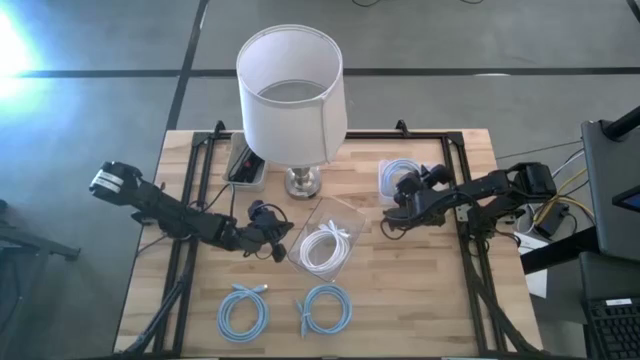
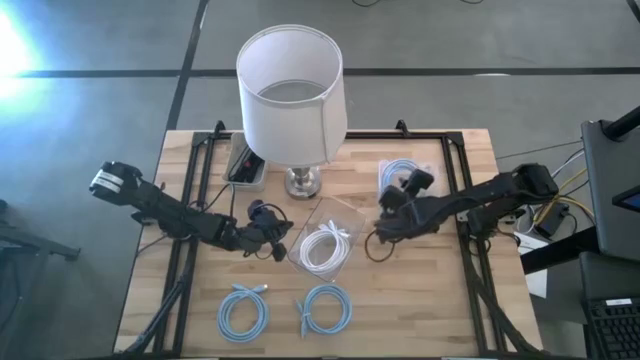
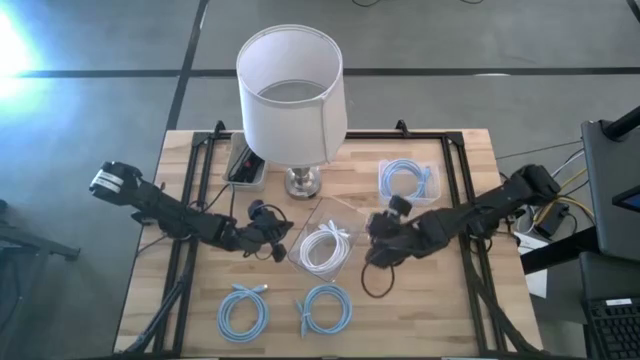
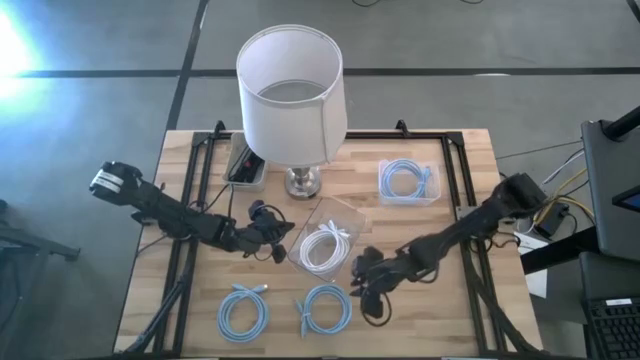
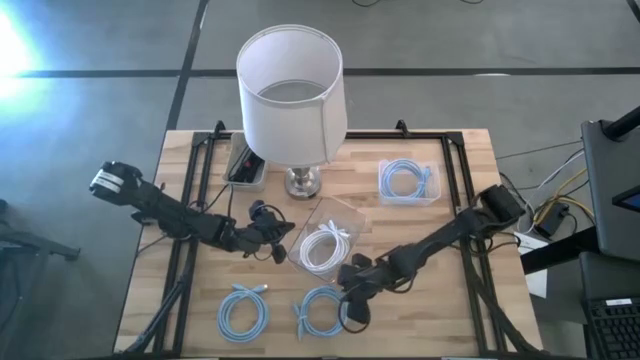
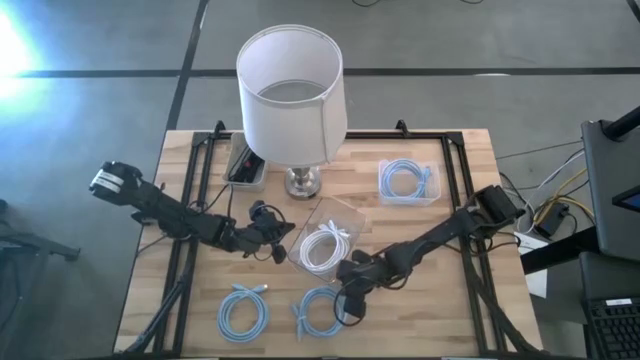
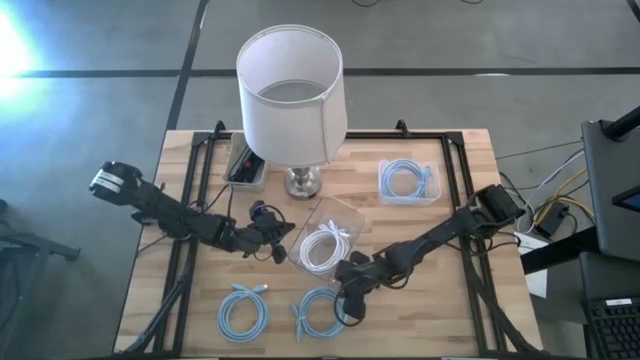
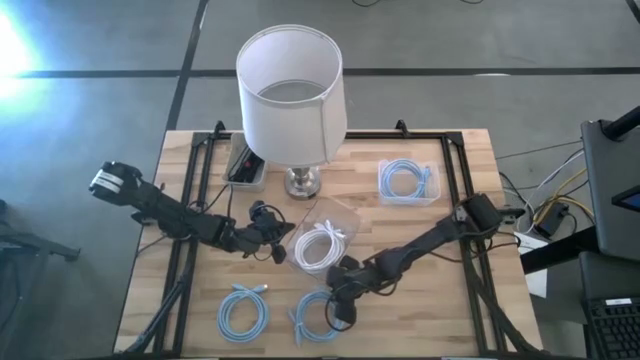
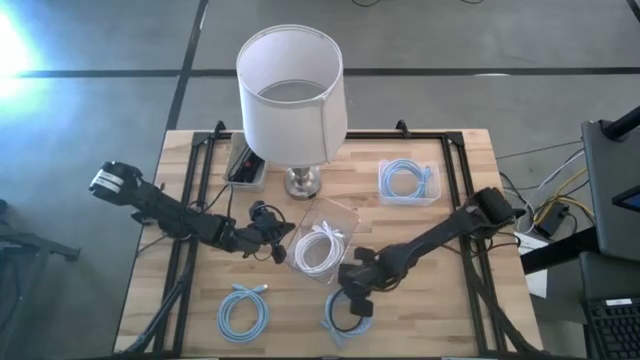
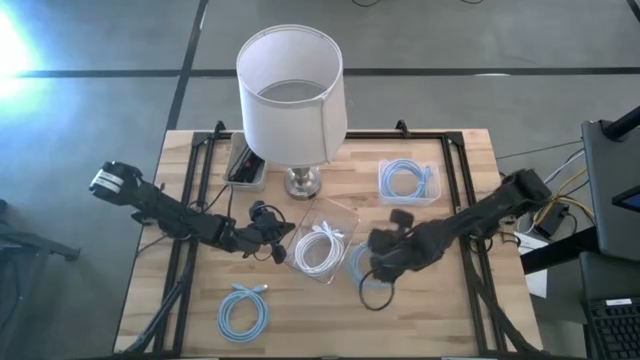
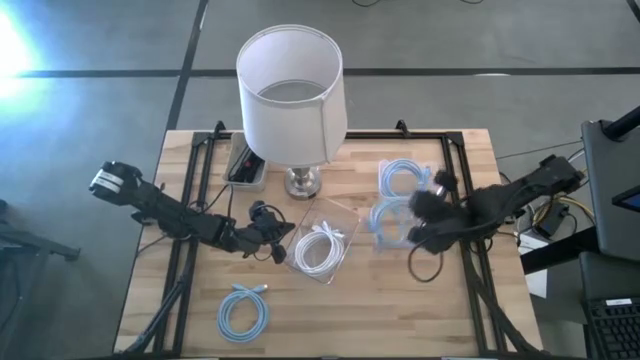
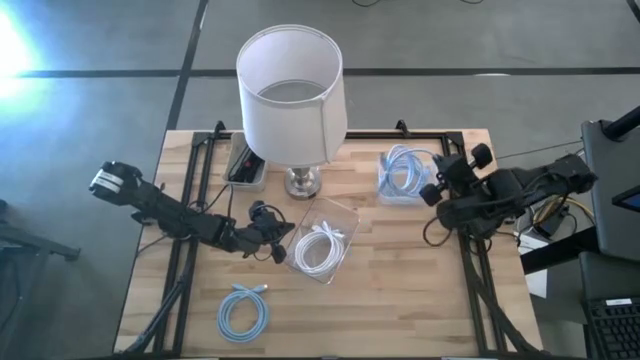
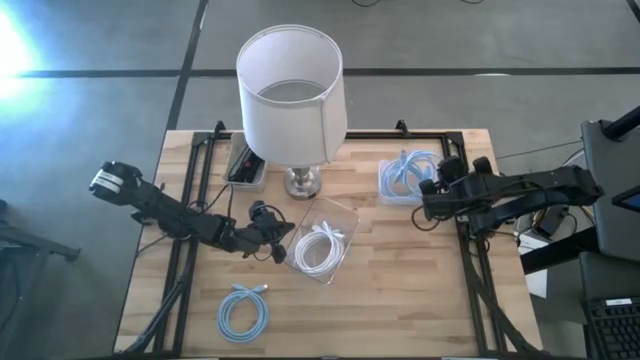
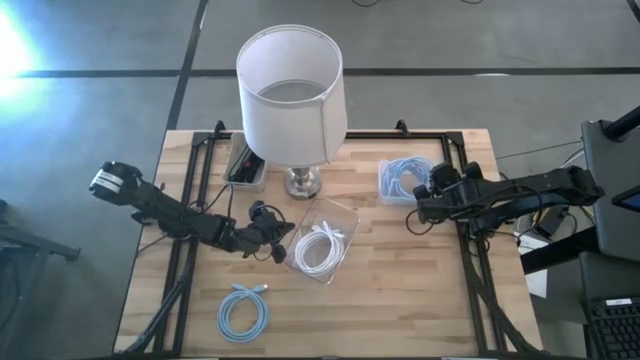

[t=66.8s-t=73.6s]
Task: Pick & Place USB Port
Put the right blue display cable into the white bin

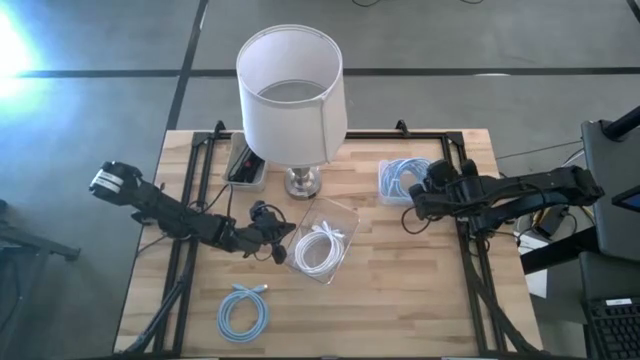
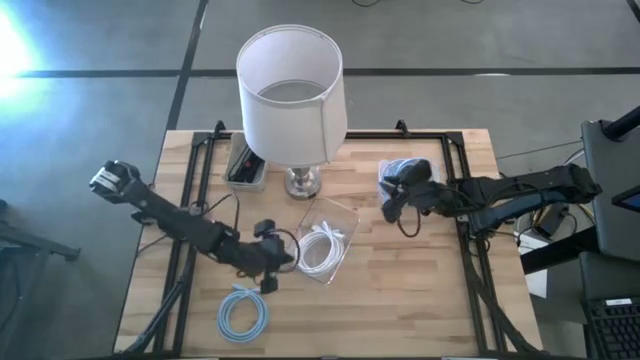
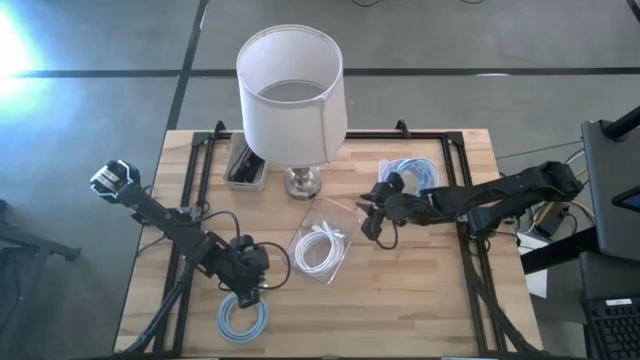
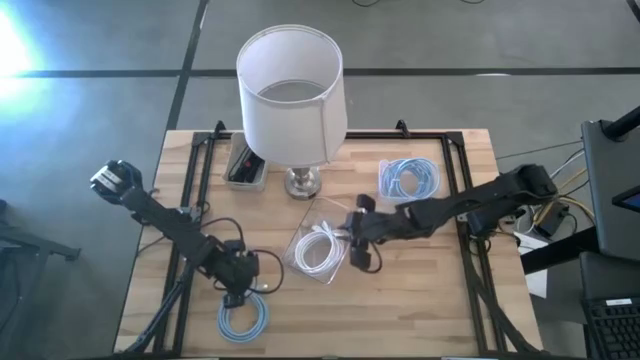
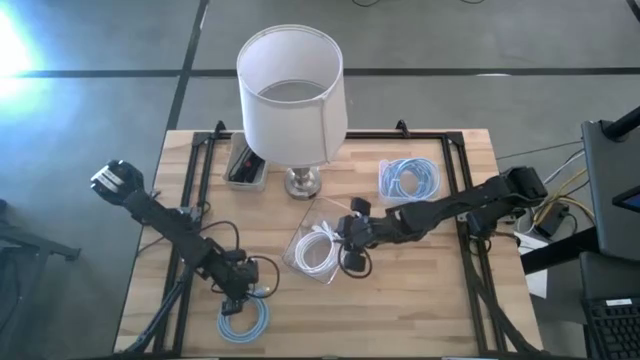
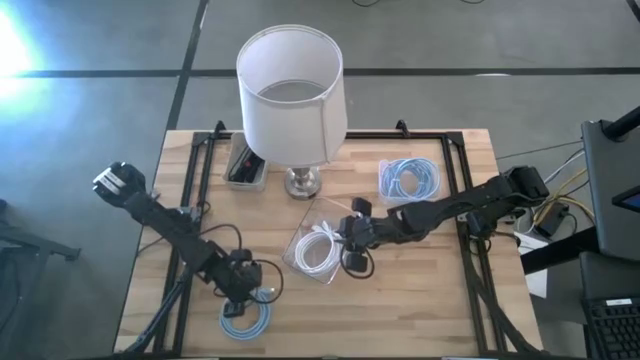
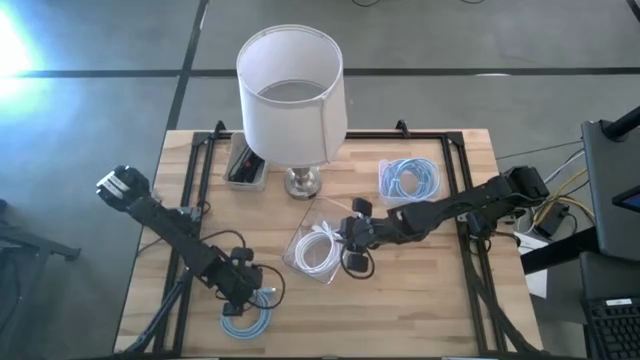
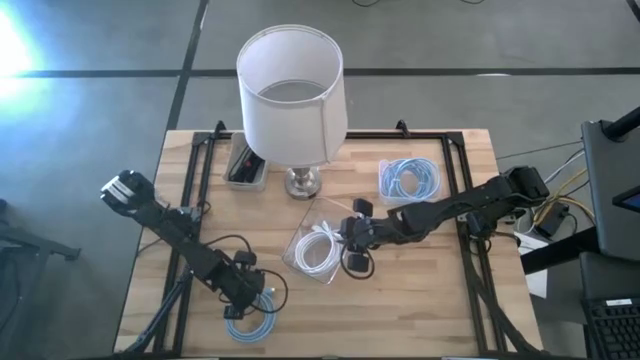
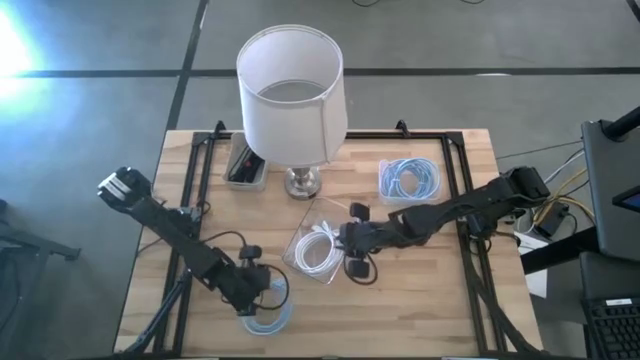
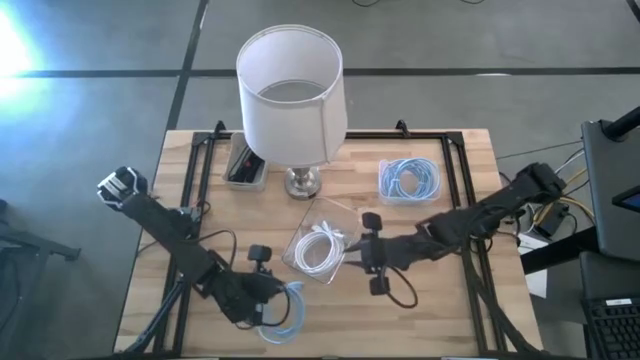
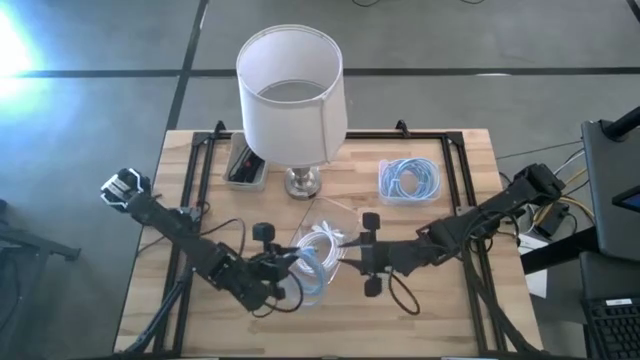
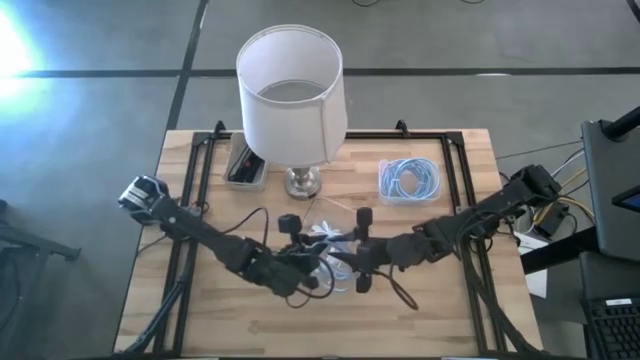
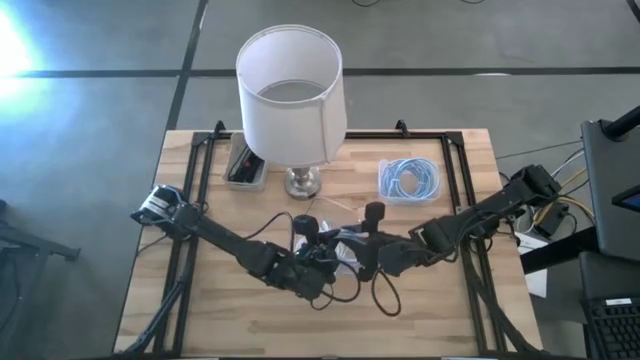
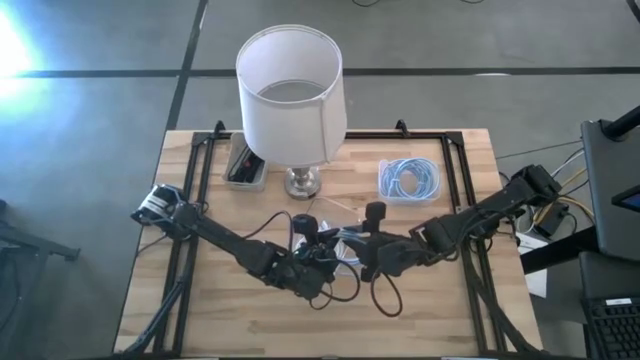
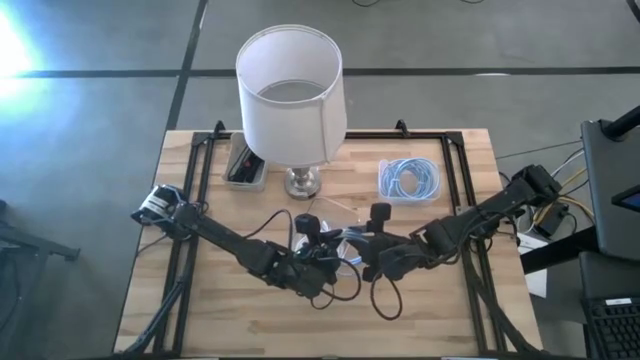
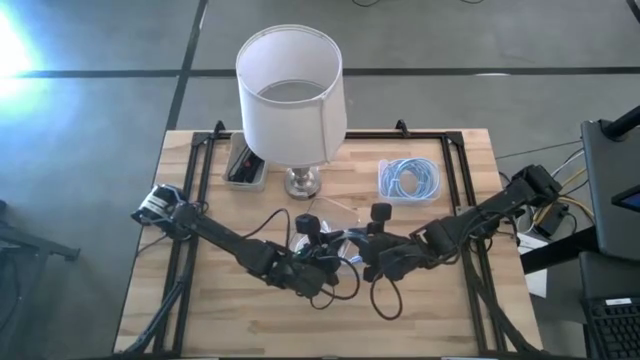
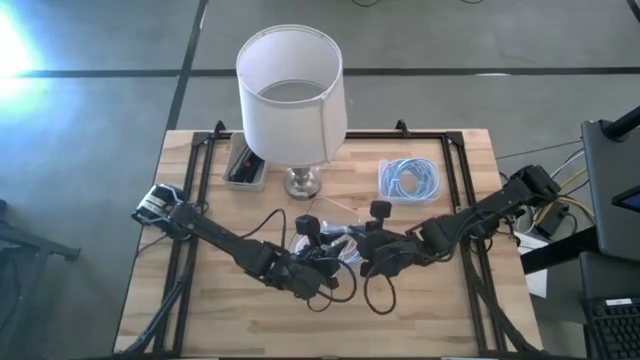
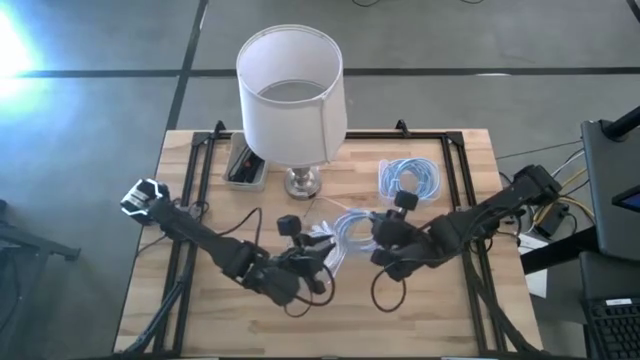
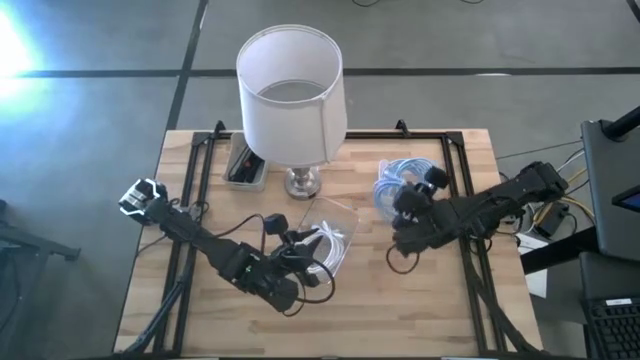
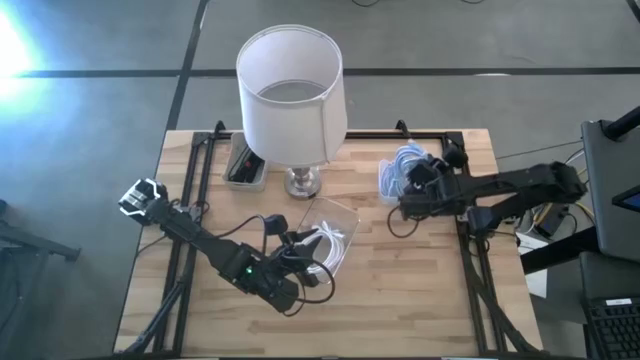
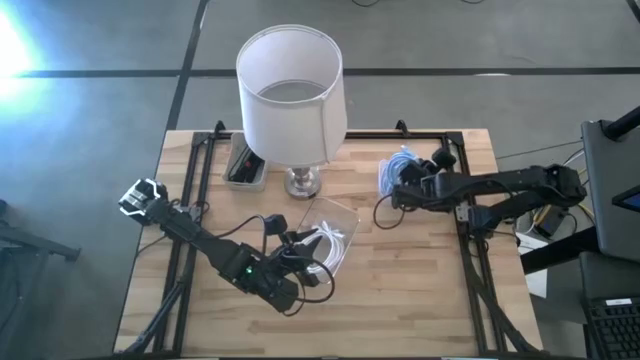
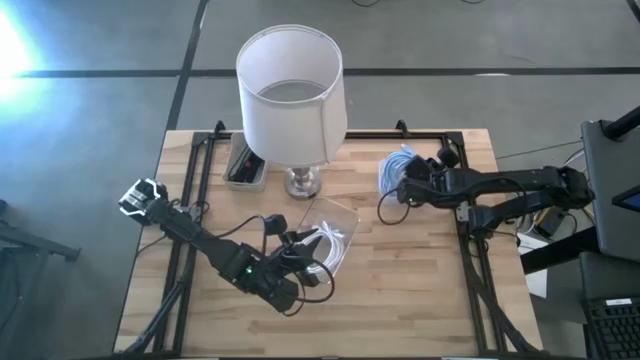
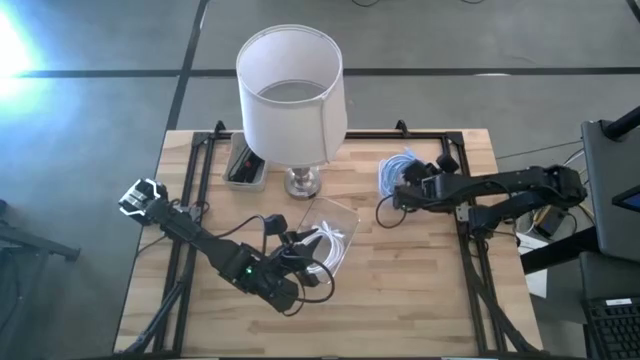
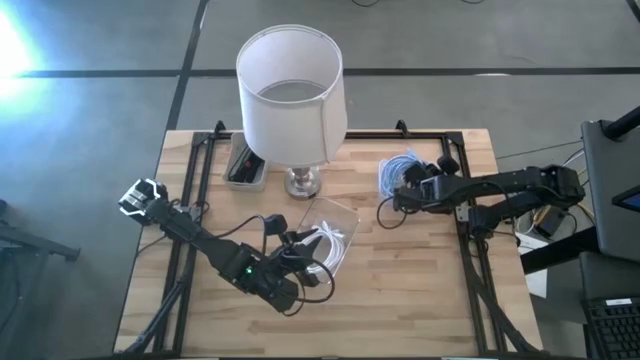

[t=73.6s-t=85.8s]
Put the blue display cable into the white bin

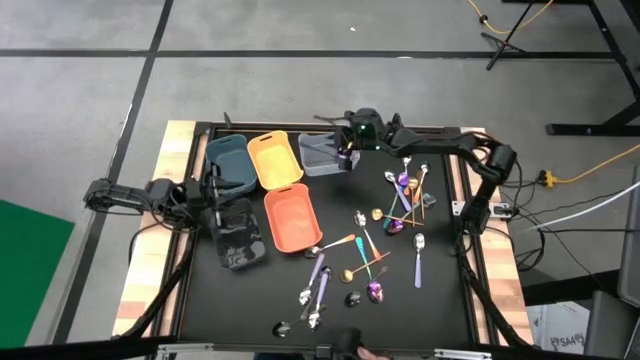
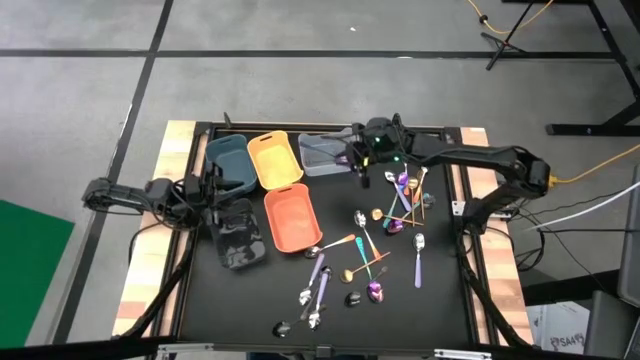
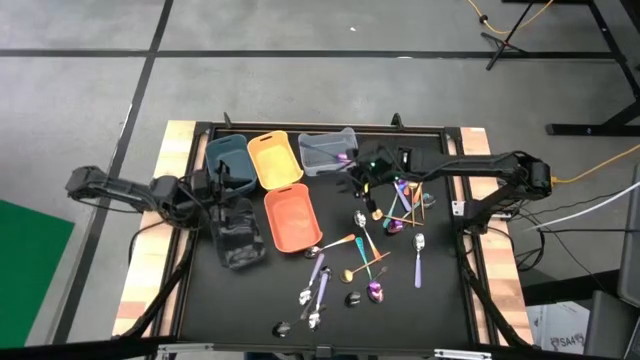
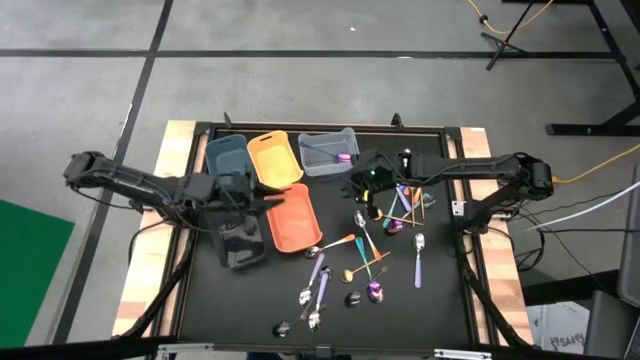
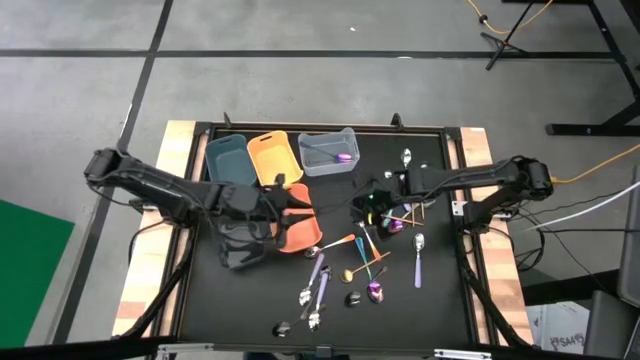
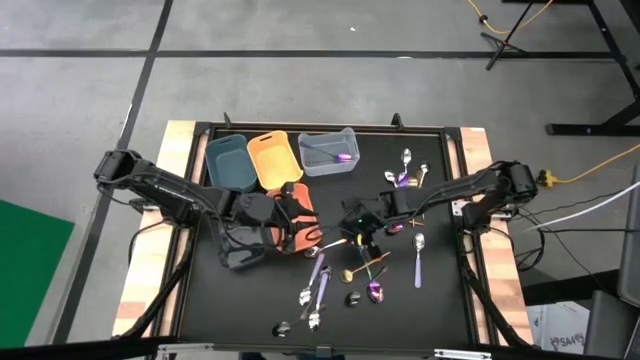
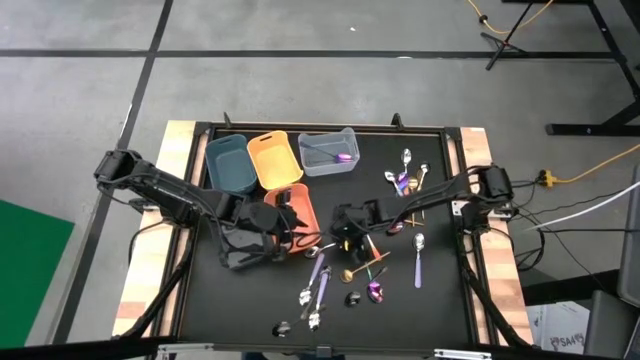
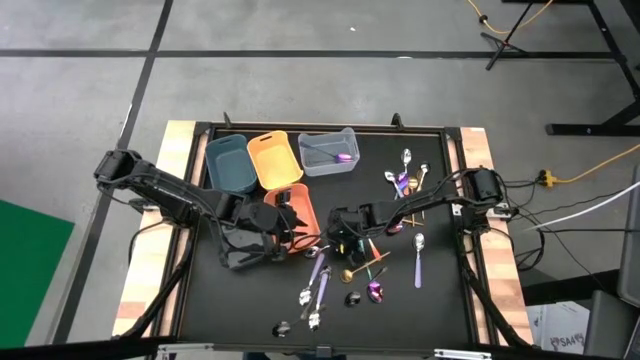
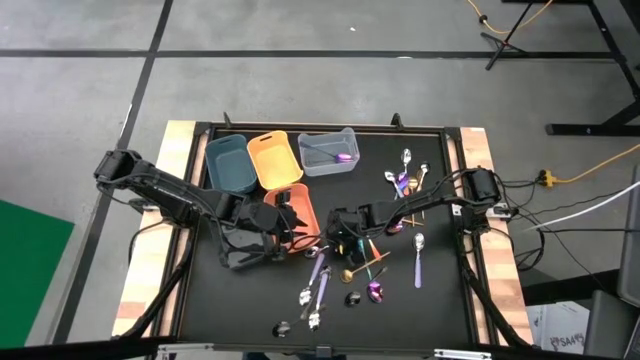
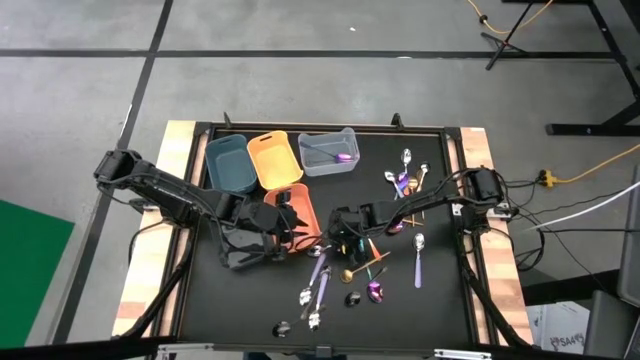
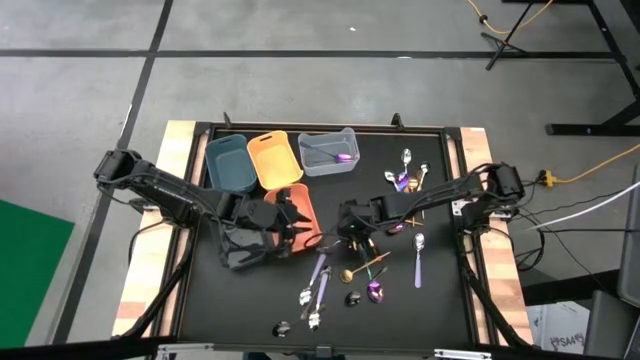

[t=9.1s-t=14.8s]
Task: Sort silverware by color (type)
Put the orange spoon into the blue bin
